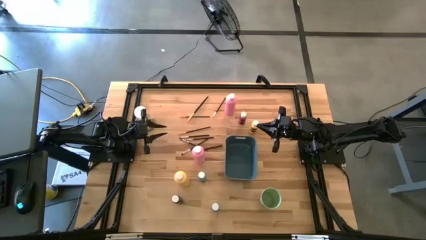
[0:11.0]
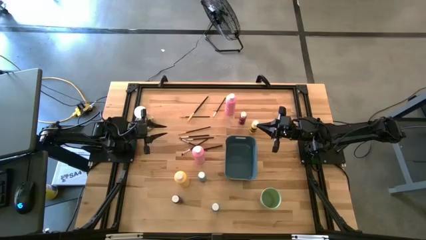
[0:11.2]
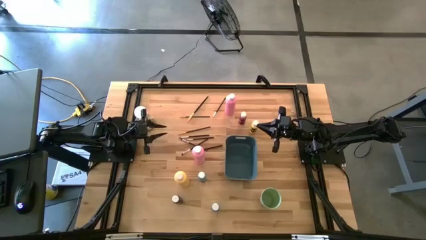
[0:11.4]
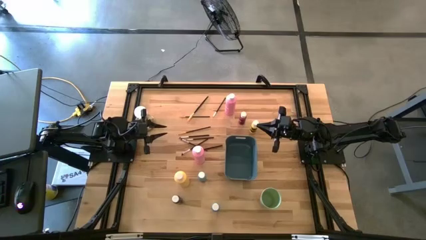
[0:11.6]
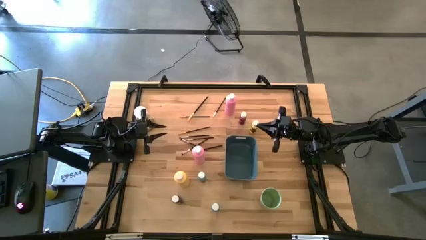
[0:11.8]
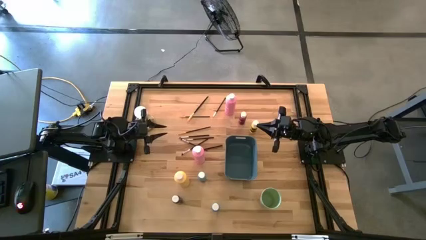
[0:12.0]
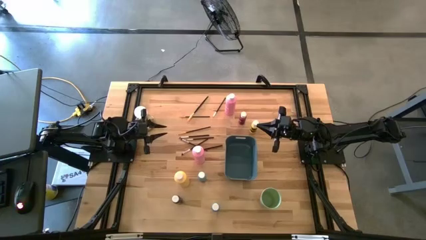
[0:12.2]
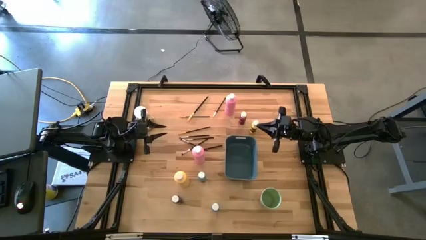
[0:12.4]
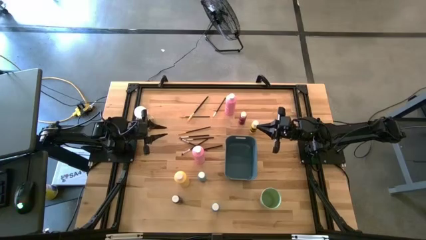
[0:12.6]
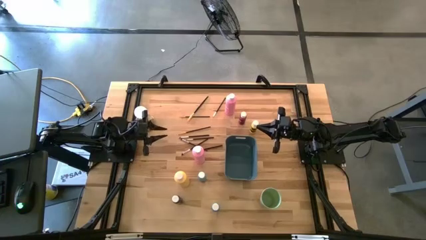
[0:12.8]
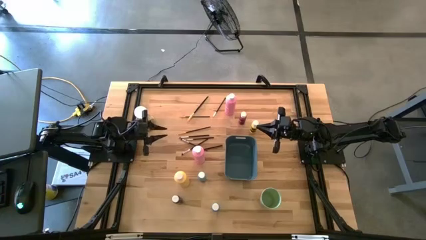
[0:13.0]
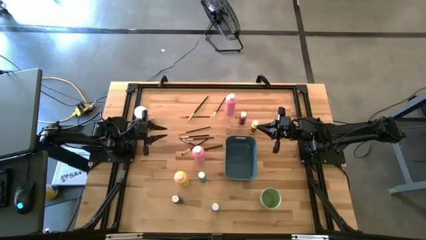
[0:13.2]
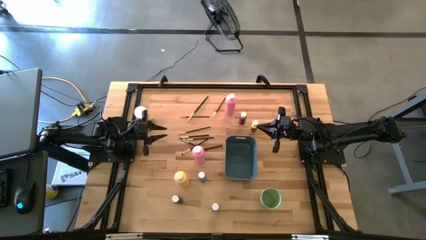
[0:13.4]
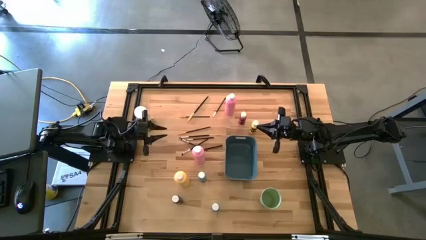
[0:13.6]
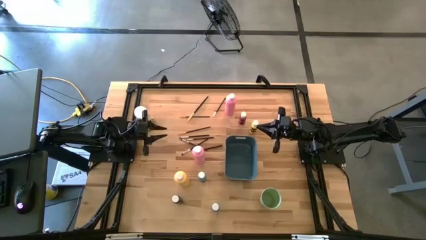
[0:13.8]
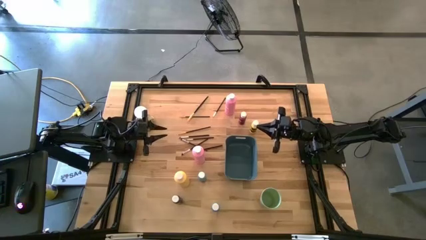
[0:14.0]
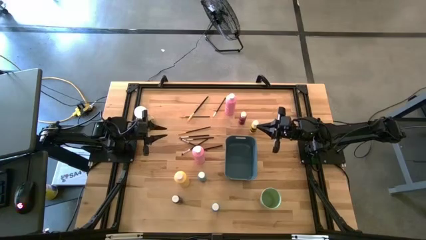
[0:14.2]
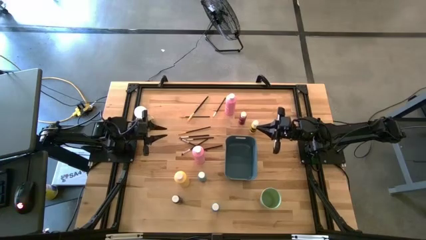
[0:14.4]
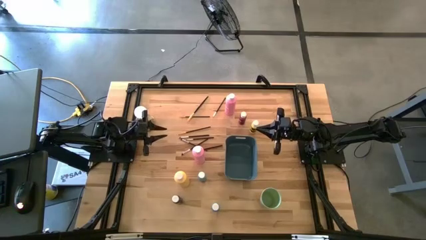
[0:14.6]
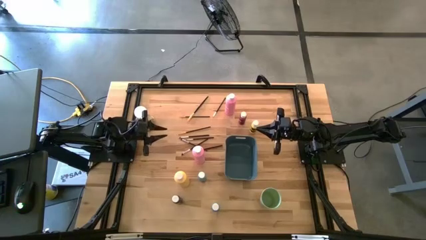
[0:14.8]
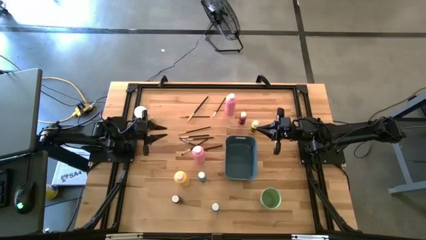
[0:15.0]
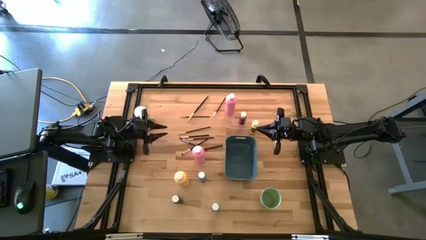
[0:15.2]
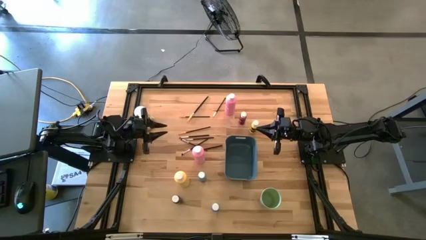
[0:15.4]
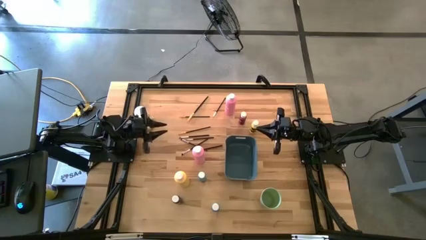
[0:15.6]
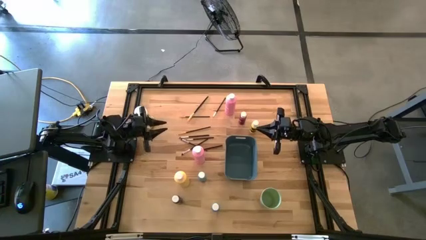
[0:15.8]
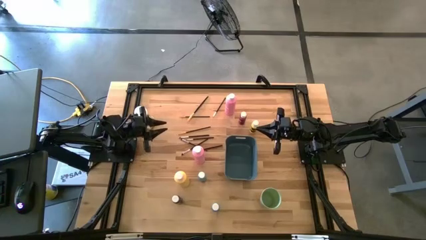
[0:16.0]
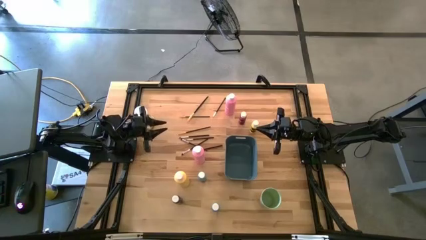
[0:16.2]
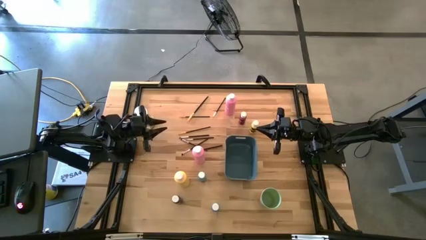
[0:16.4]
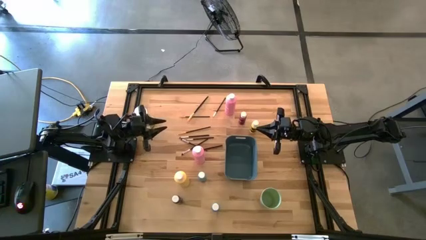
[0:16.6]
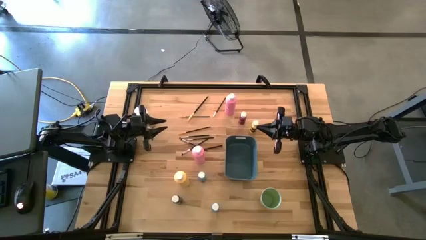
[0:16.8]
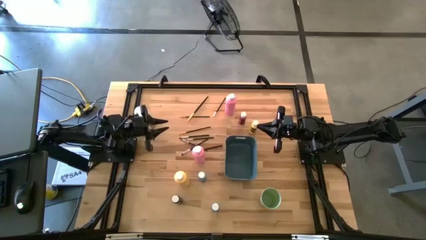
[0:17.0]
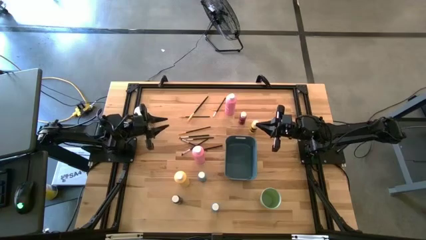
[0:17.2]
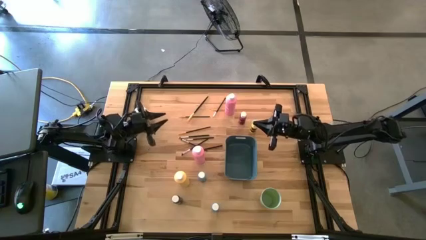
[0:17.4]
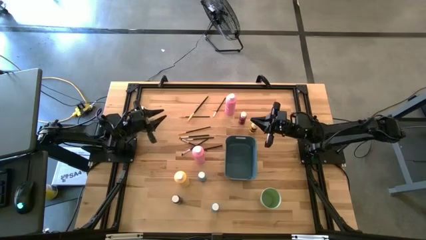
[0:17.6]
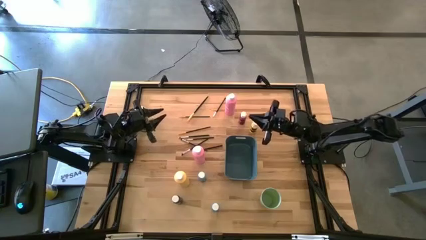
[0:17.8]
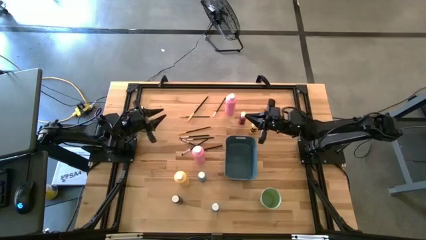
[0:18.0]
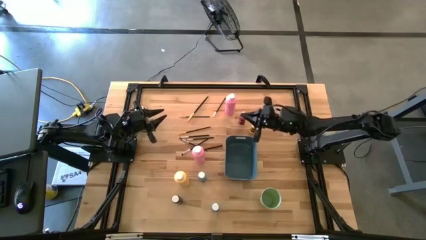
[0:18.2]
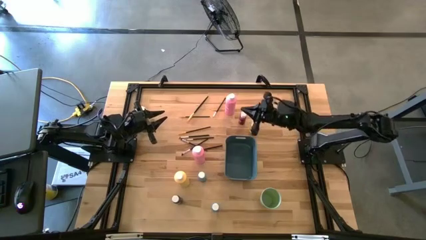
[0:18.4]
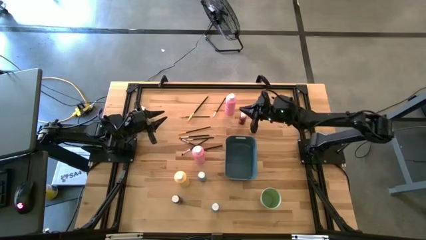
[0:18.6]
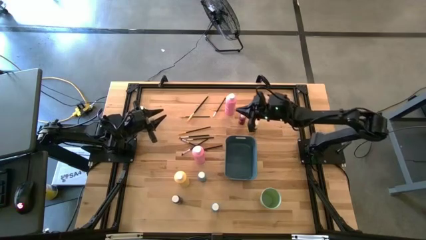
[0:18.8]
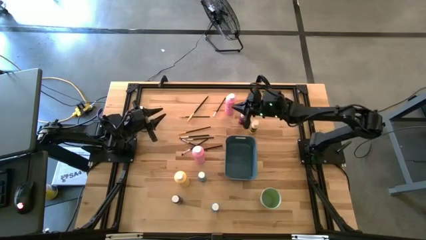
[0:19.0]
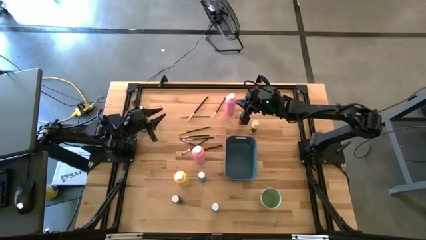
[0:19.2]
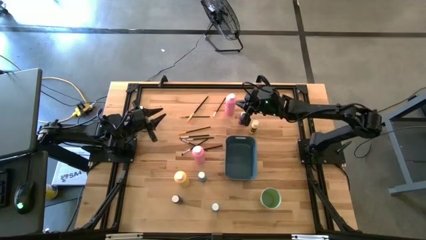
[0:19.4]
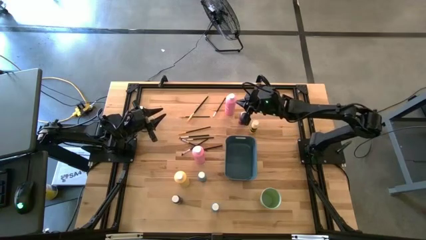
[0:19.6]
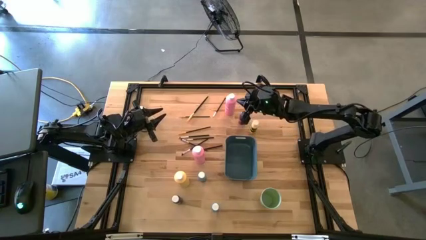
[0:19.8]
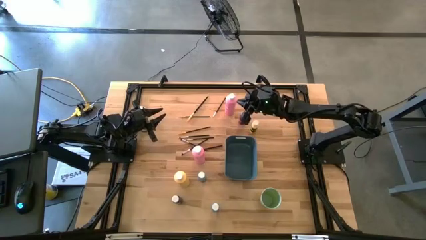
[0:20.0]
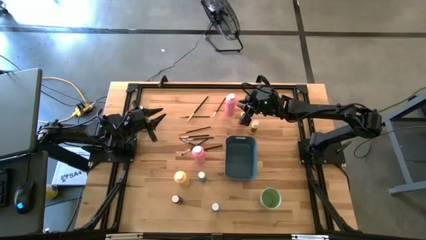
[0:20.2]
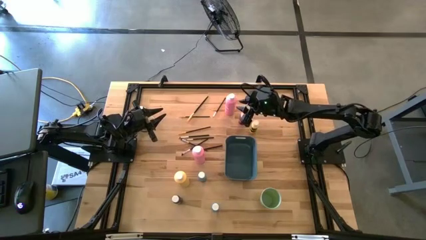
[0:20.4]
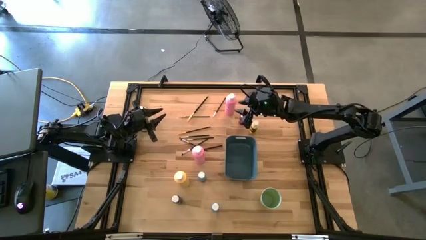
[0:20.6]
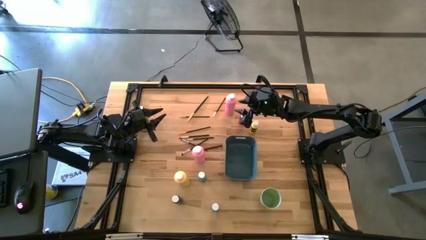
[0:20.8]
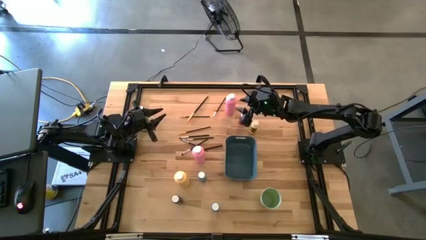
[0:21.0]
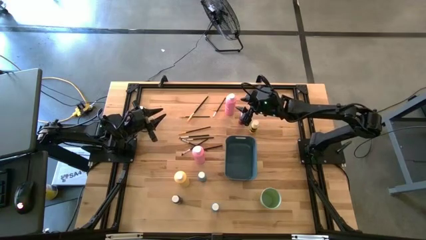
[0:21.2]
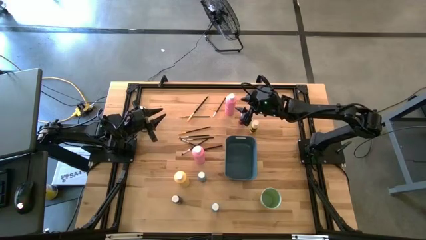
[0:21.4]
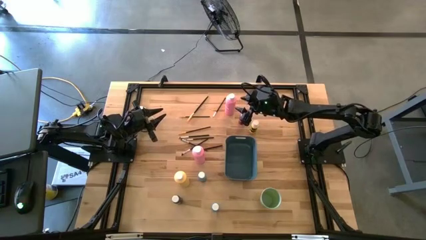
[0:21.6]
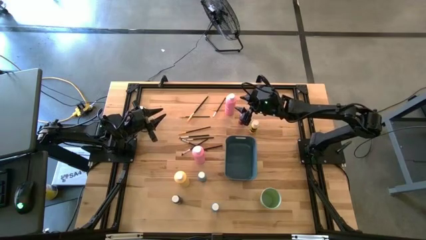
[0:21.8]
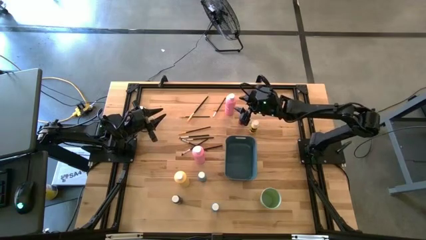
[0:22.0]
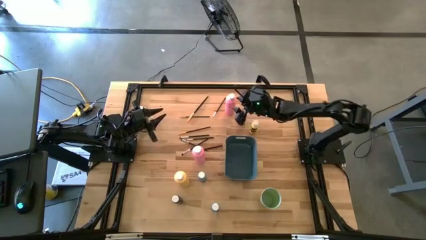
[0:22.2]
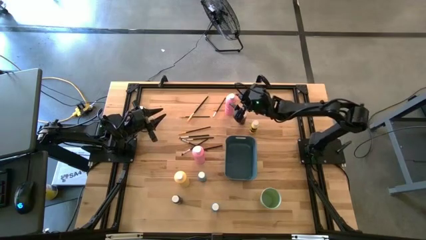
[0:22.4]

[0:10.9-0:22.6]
Task: Pick & Place Paint Supplies
Put the large pink paint bottle into the blue bin

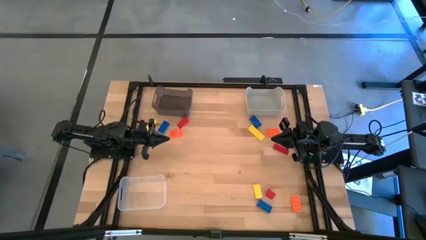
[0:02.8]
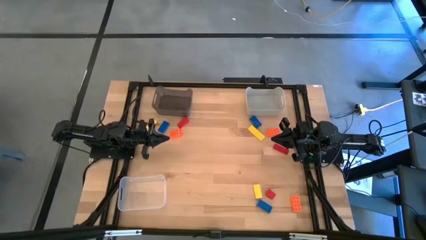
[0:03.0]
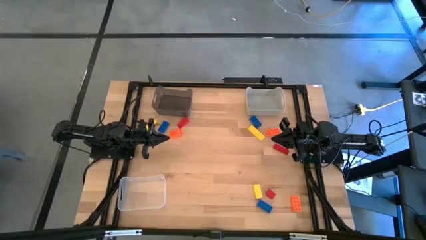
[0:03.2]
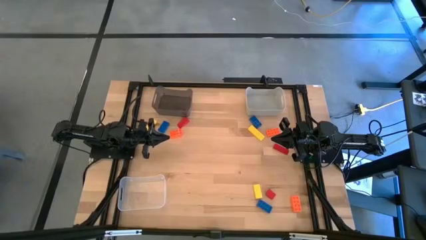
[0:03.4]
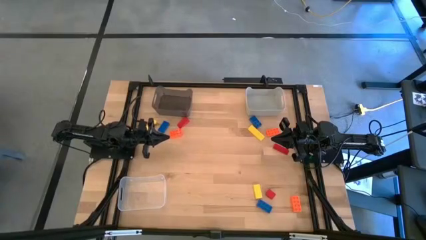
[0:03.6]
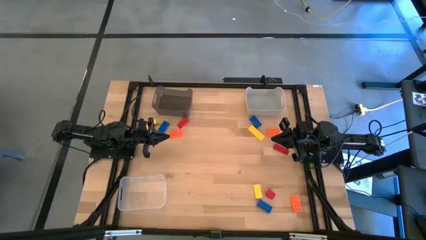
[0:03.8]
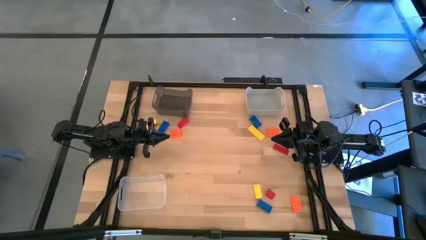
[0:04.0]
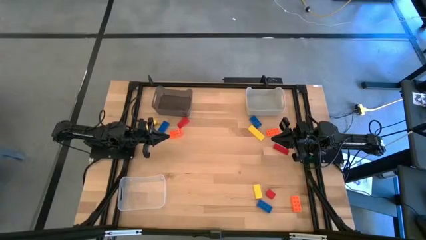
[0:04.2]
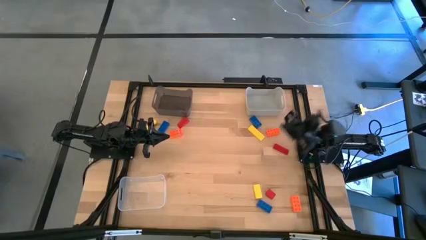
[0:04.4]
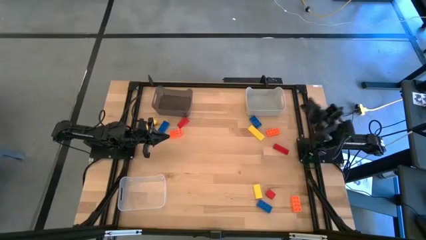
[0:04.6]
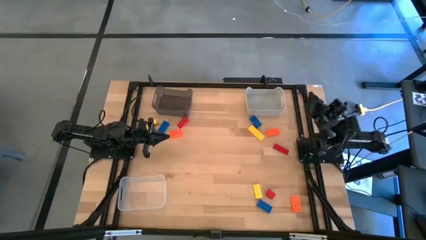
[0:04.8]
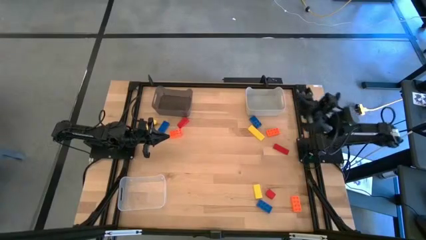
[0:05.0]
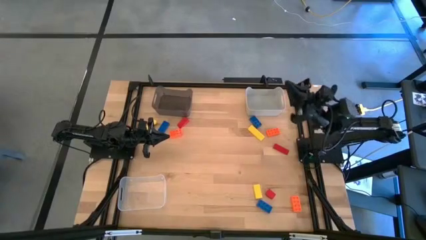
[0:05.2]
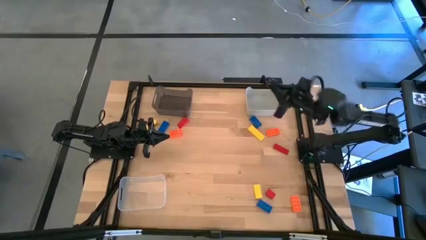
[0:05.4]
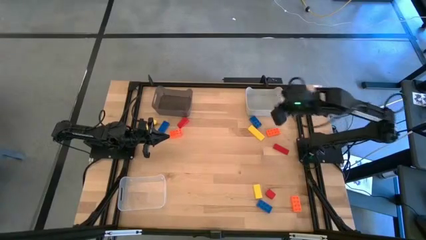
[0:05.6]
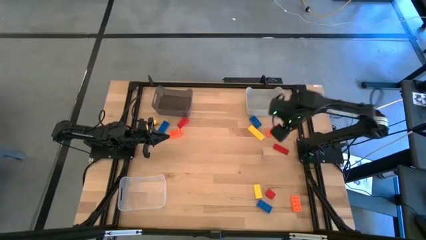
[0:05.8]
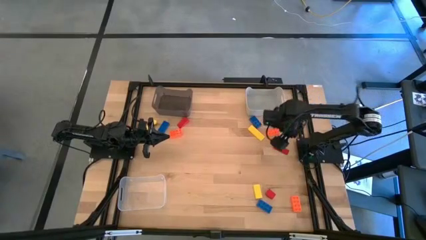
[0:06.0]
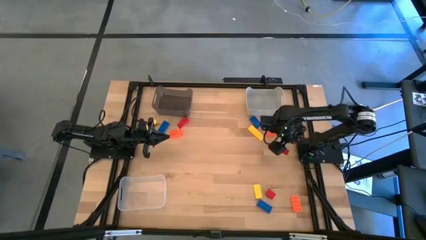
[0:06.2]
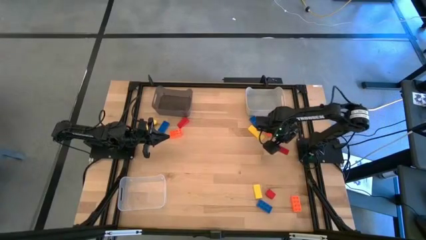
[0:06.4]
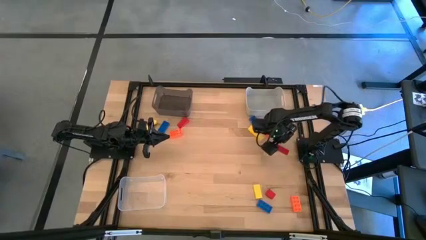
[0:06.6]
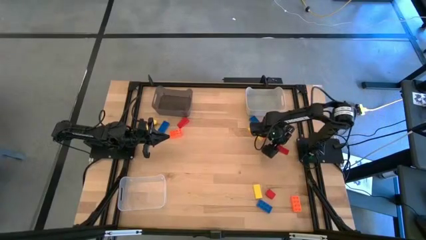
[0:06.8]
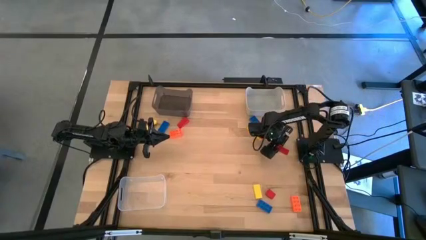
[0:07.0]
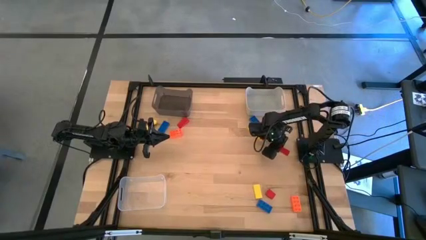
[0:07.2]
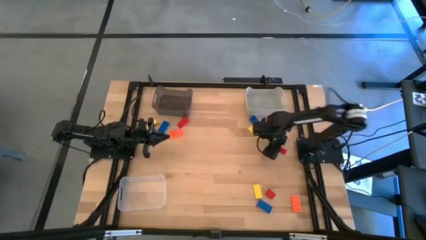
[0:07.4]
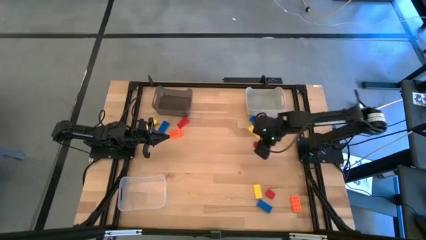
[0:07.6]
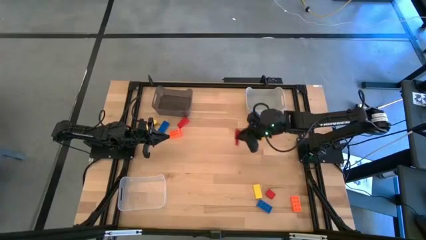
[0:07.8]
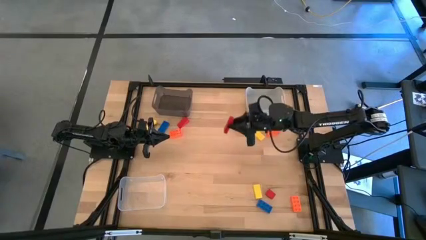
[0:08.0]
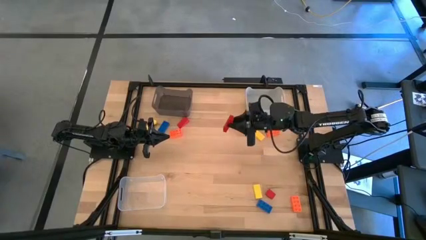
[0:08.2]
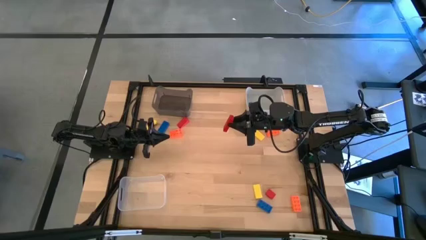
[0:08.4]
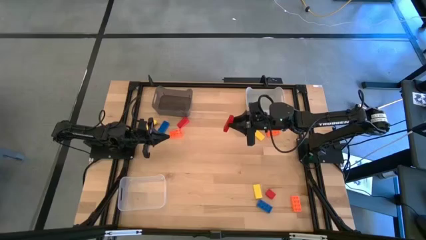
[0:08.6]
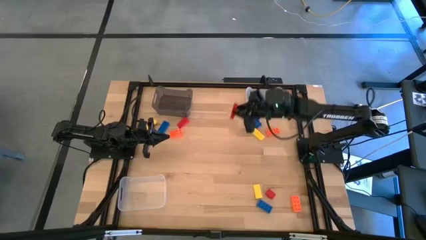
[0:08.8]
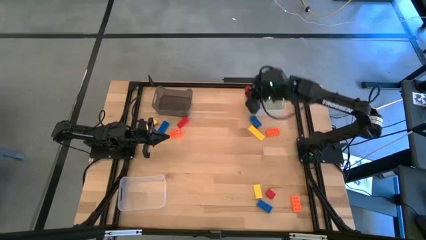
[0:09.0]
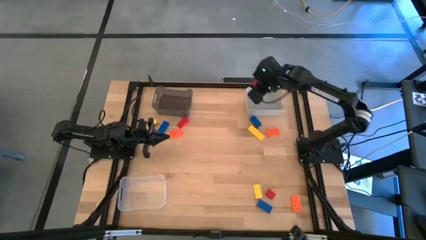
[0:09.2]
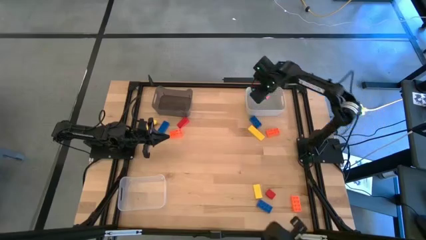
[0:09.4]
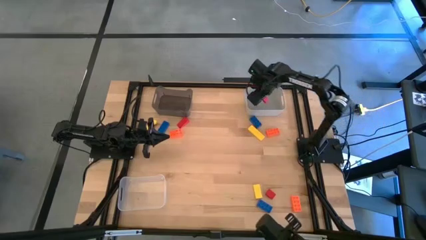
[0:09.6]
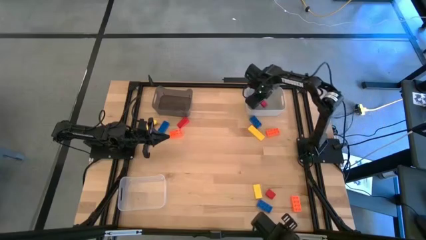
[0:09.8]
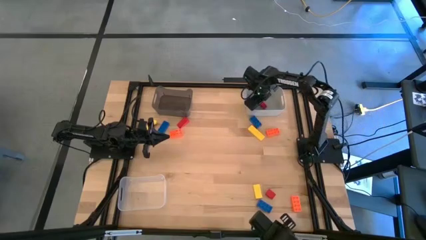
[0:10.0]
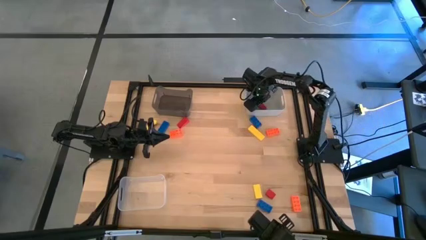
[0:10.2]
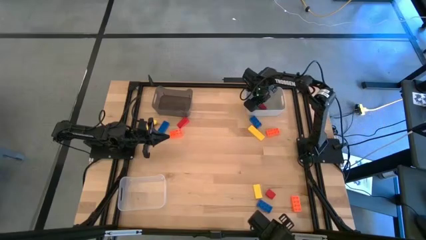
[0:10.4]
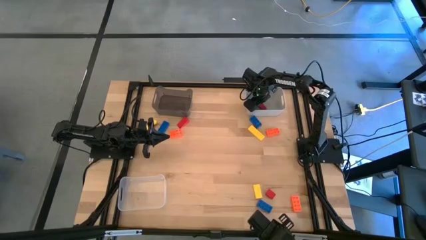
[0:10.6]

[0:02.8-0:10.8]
Task: Sort & place blocks by color
Put the red rectangular block into the gray bin
